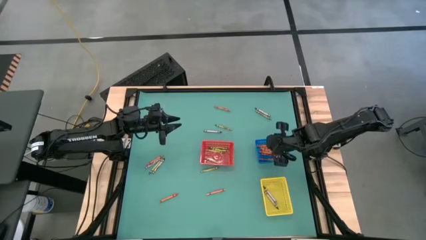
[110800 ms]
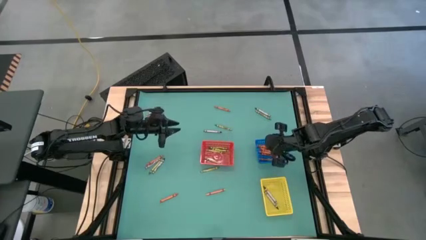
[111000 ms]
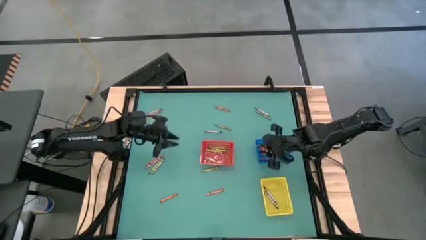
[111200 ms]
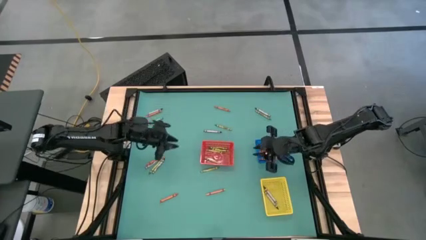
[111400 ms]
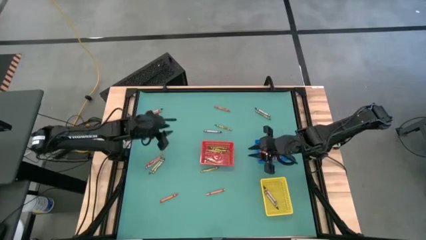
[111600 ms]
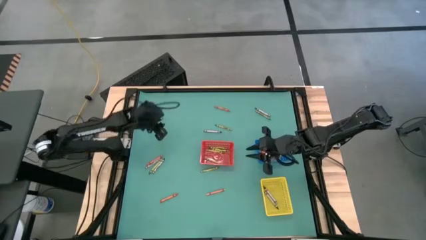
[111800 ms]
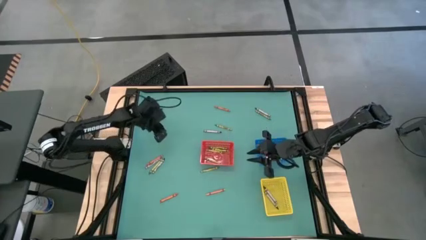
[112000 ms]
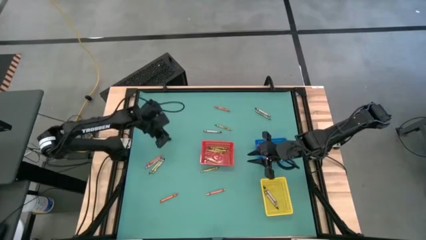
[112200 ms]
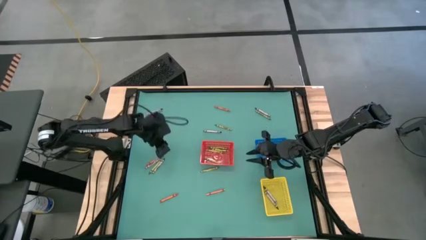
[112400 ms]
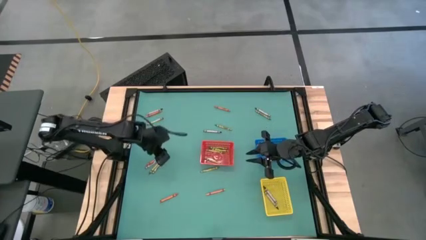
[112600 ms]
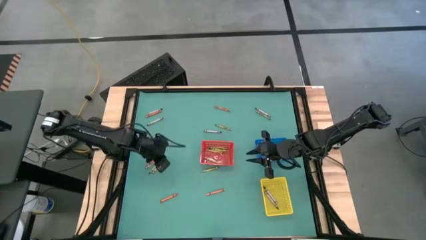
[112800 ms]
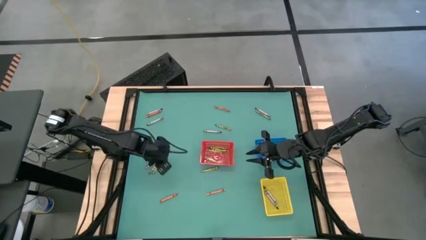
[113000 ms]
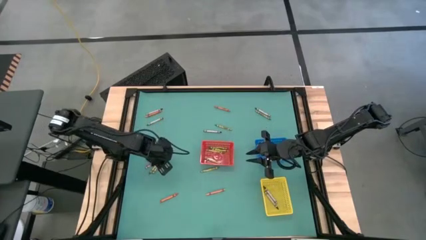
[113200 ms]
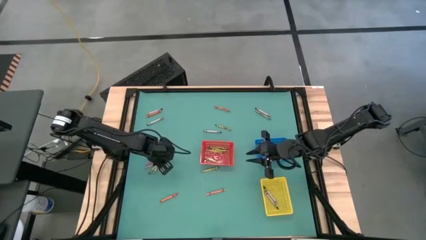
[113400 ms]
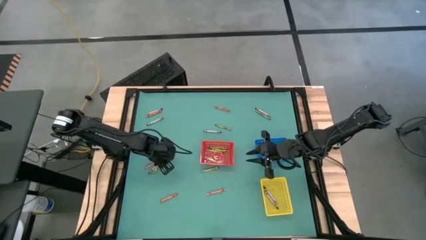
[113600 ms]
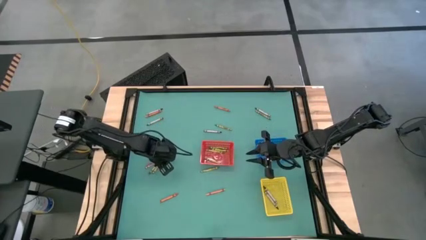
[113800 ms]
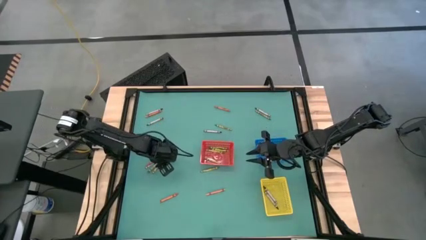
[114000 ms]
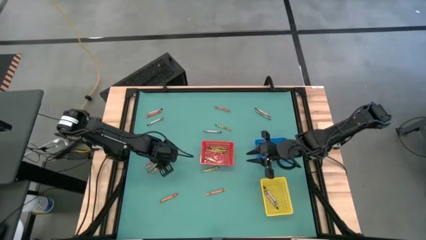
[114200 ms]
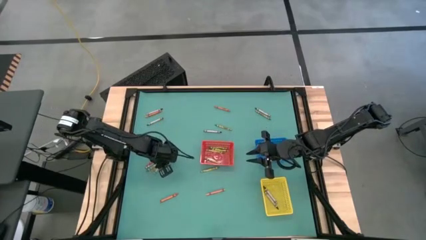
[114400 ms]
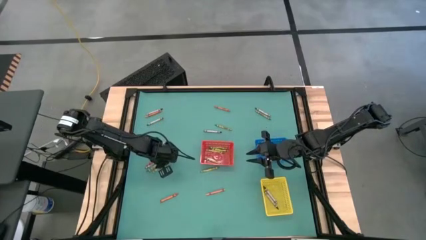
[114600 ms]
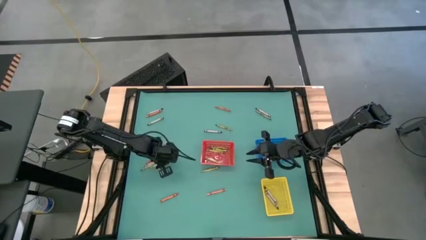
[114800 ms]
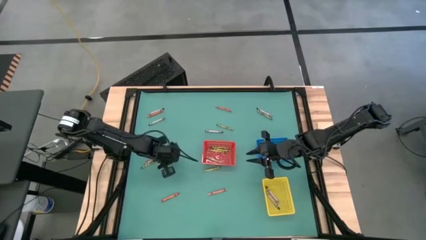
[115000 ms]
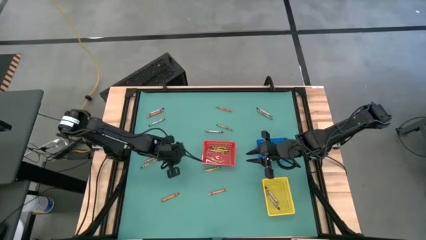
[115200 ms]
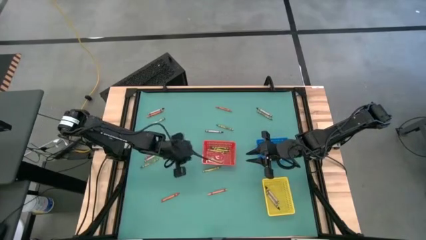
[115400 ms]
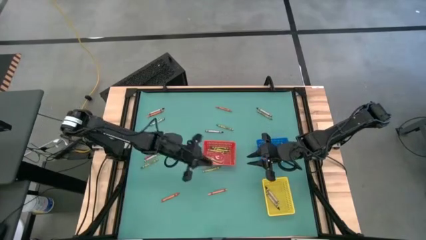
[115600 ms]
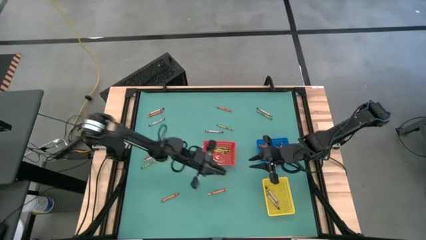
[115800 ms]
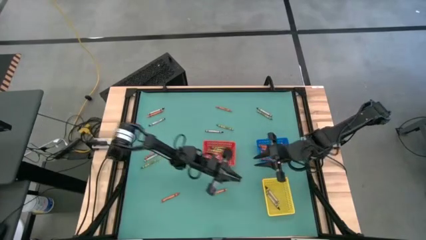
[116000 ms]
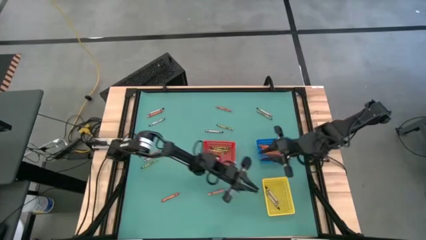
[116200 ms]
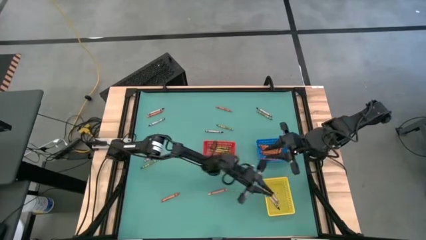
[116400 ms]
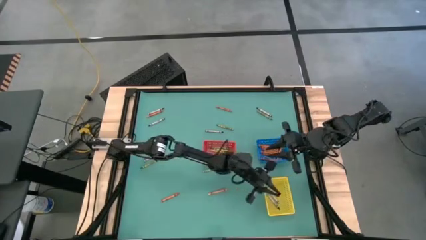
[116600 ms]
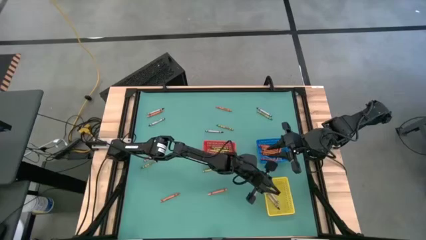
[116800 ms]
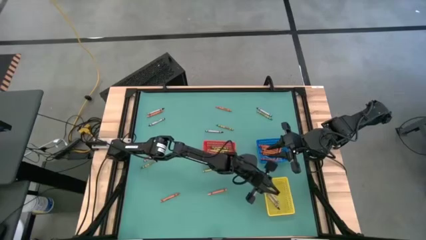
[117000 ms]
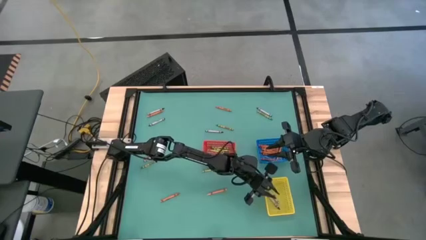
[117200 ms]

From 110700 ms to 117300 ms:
Task: Sort crayons
Put the black crayon into the yellow basket

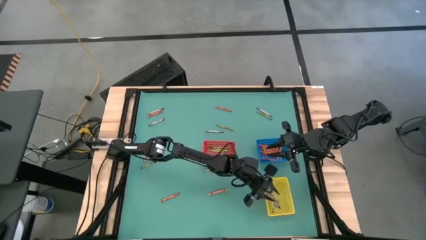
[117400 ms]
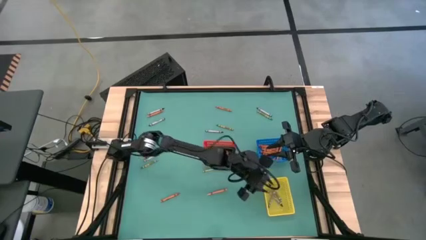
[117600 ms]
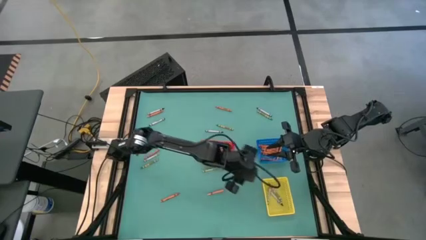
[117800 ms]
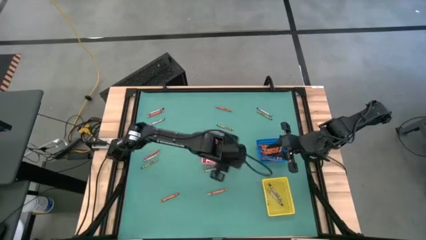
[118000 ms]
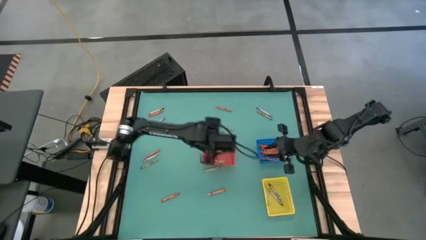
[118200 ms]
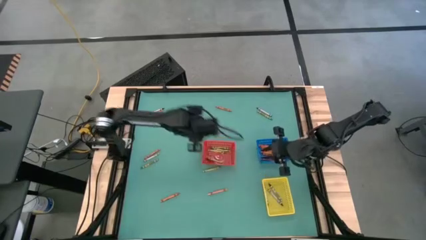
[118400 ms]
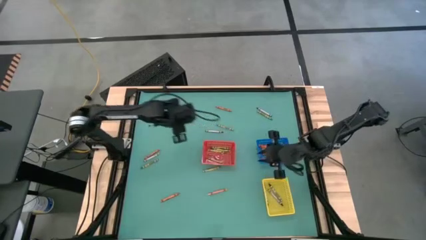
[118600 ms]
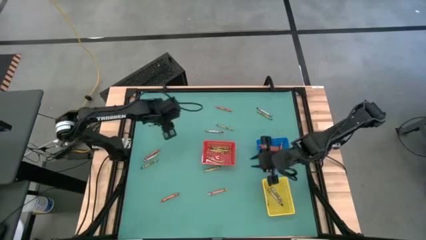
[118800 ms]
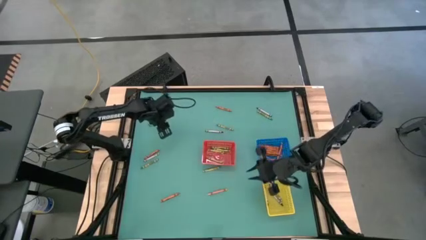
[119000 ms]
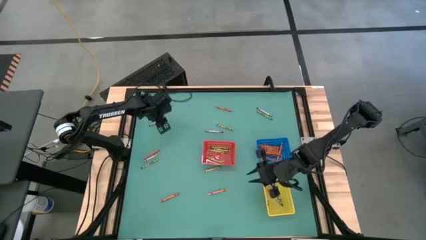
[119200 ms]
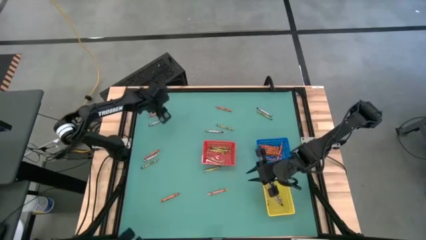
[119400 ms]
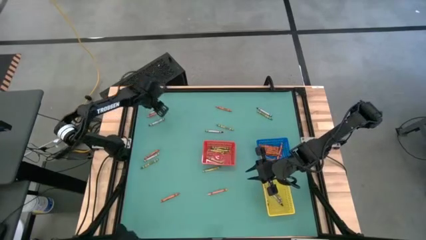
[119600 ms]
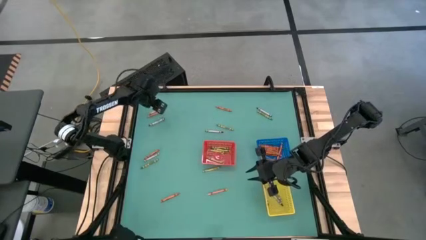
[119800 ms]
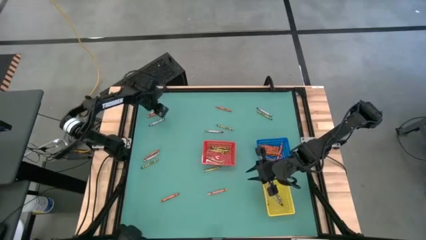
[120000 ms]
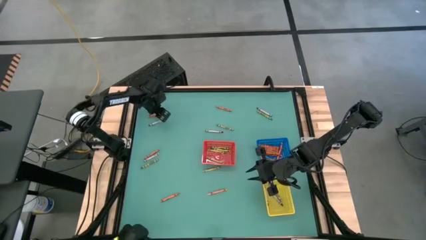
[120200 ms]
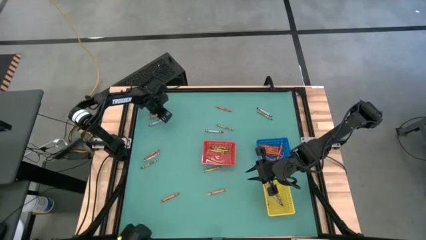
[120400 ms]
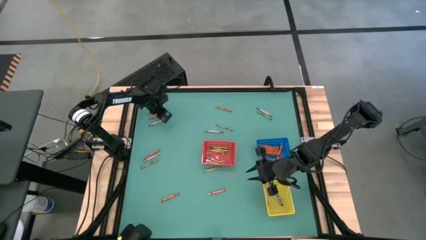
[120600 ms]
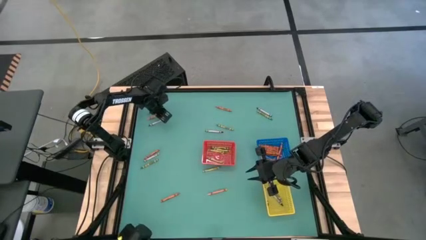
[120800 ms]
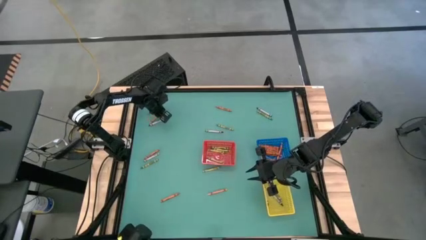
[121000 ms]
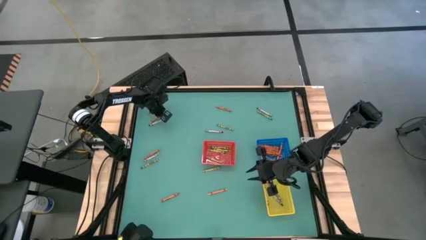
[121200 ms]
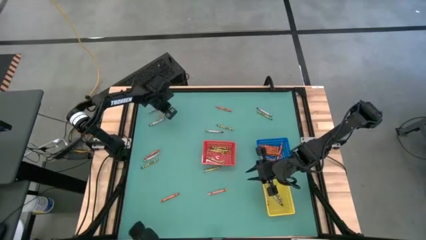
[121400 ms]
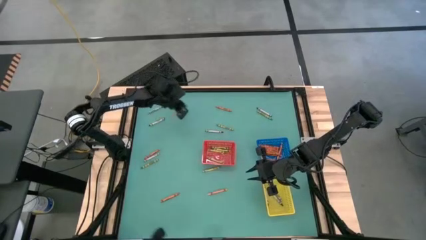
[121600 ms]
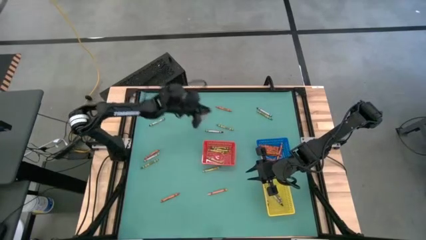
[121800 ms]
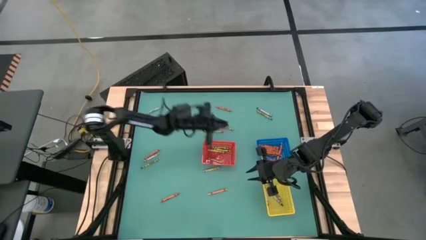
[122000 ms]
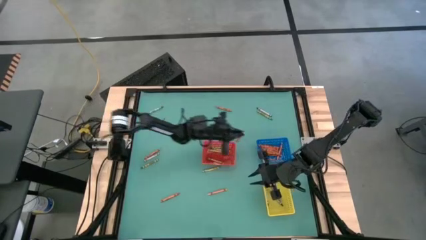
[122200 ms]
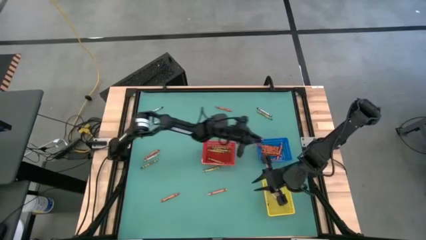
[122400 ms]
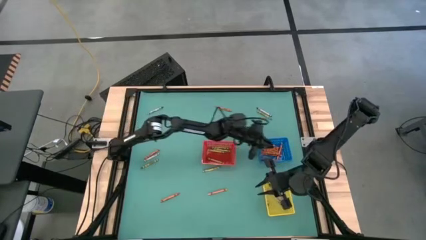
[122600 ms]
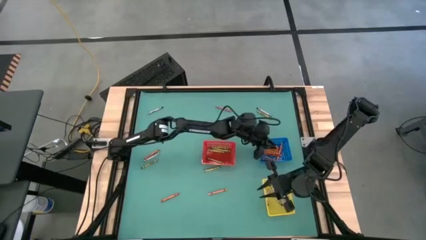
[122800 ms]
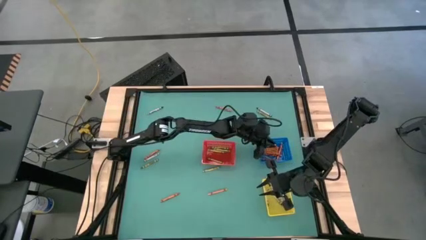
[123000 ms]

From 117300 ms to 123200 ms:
Put the orange crayon into the blue basket

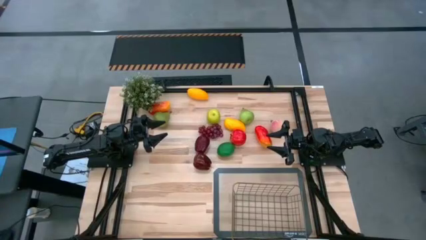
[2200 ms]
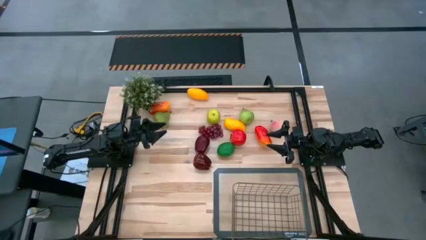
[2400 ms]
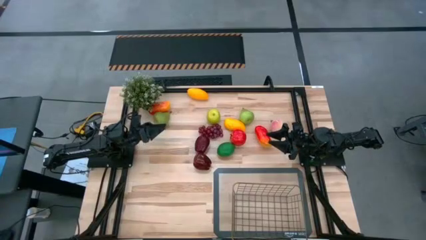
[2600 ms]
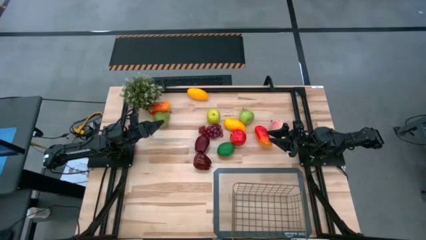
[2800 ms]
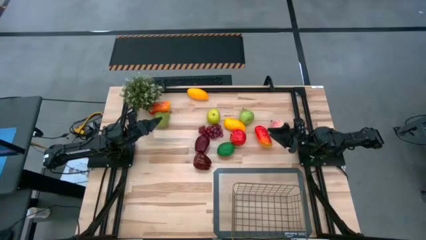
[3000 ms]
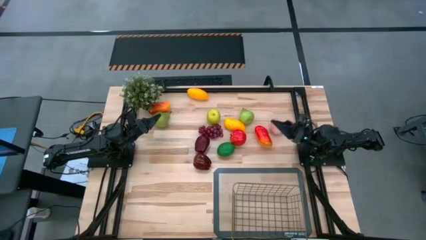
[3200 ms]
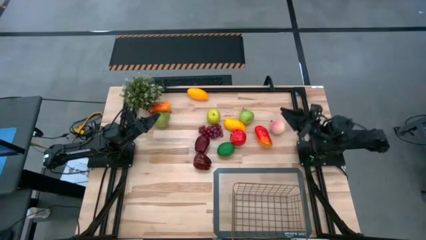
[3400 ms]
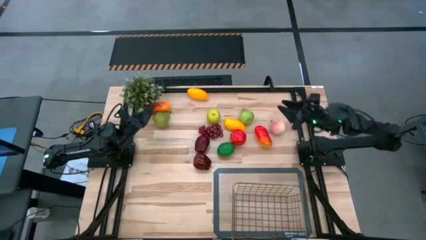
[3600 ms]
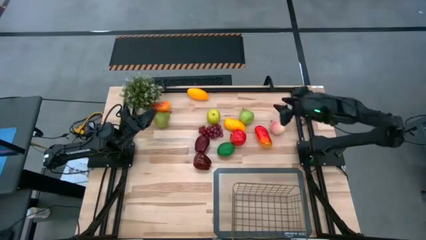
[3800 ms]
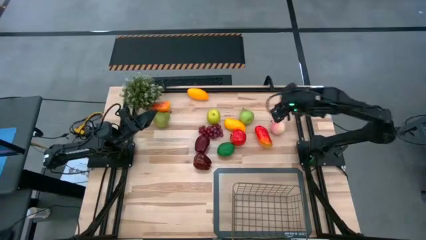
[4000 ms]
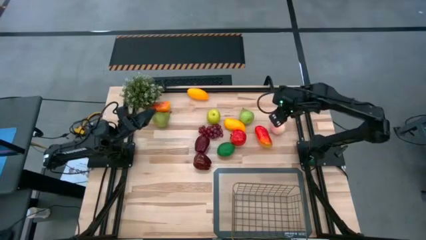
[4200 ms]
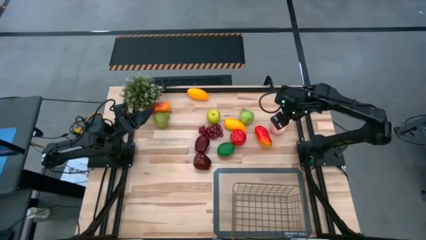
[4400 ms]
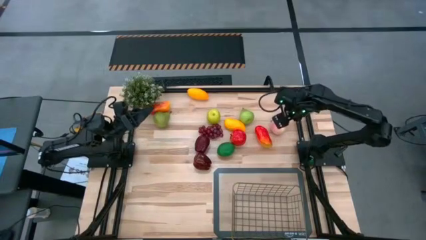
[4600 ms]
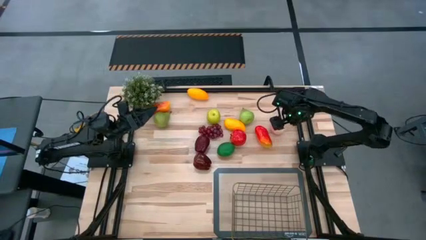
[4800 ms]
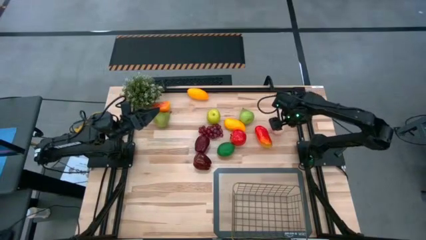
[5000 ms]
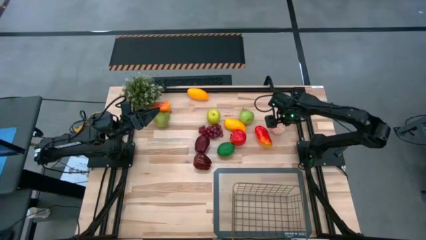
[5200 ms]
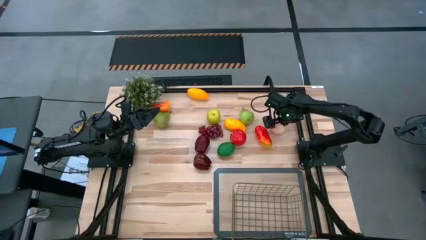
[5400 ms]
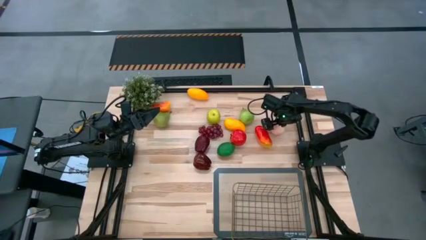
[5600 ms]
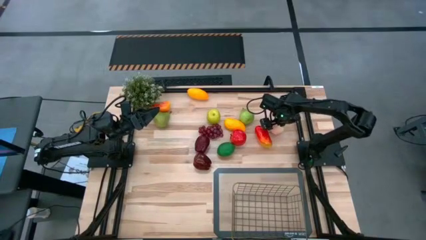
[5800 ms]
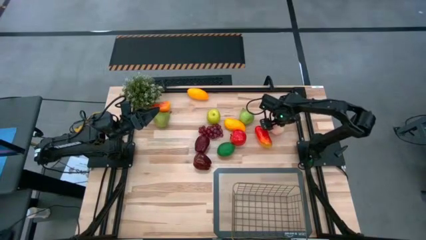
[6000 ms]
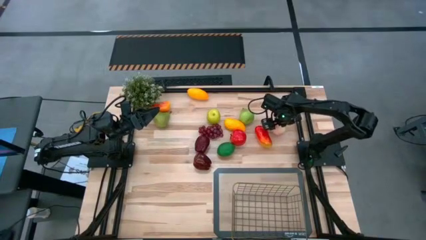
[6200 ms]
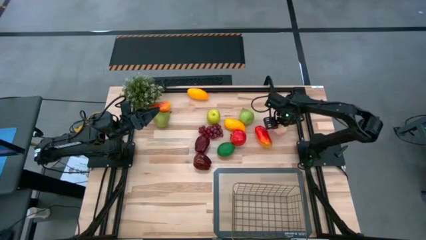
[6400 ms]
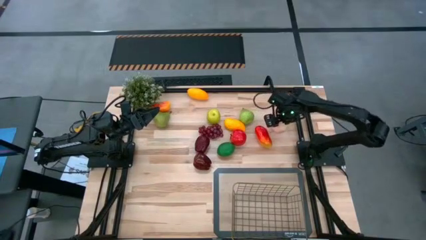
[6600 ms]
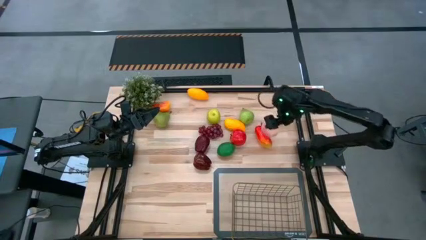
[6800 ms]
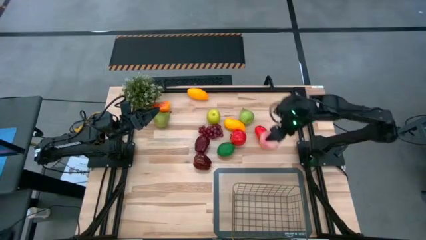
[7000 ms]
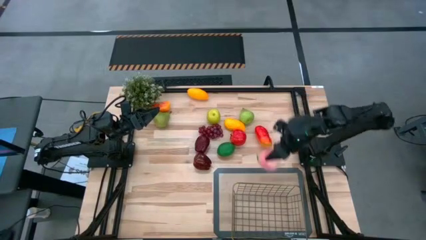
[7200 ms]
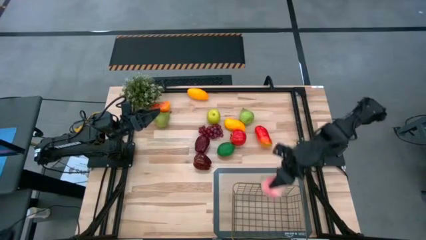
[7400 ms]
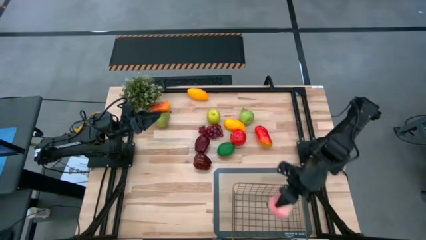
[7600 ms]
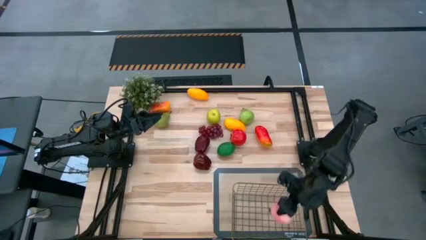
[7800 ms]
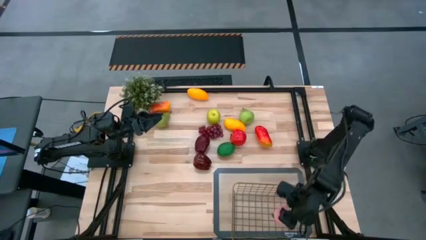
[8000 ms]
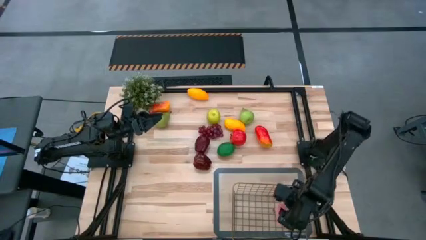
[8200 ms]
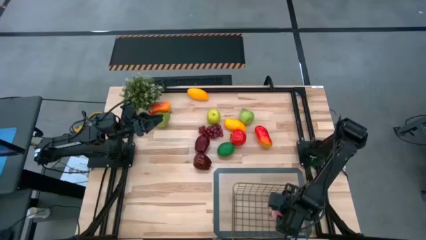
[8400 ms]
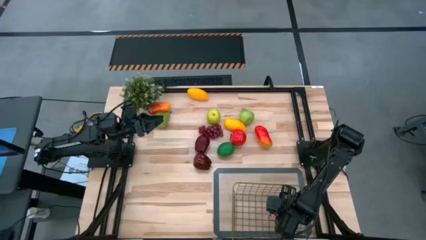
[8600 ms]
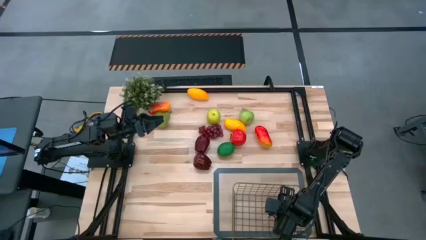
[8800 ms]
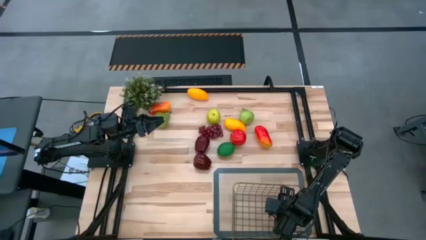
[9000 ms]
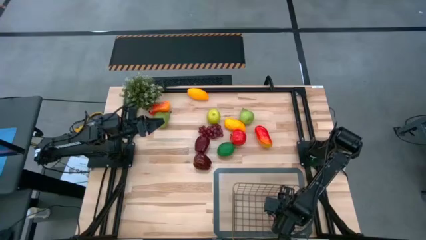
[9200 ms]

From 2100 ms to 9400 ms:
Task: Build produce basket
Put the peach into the wire basket
